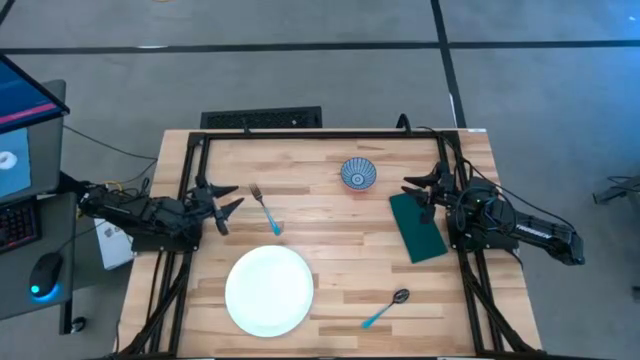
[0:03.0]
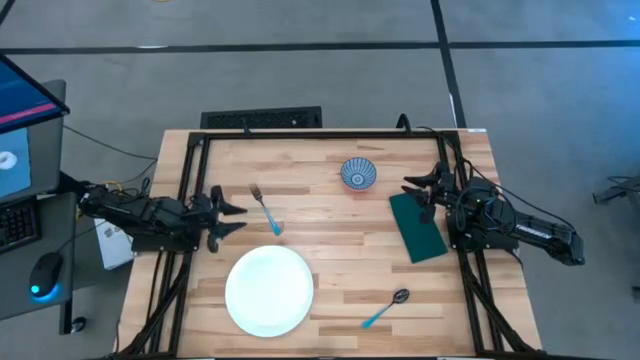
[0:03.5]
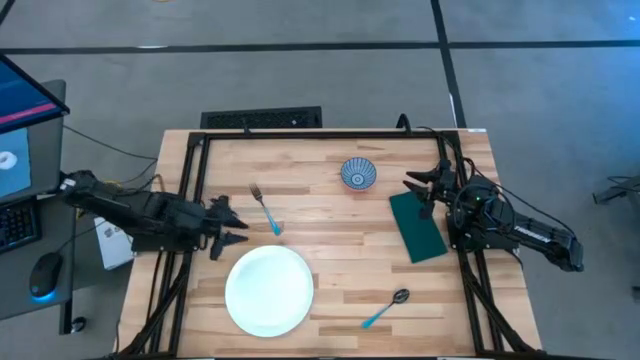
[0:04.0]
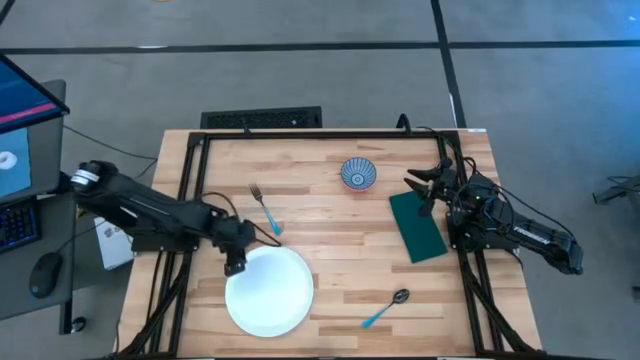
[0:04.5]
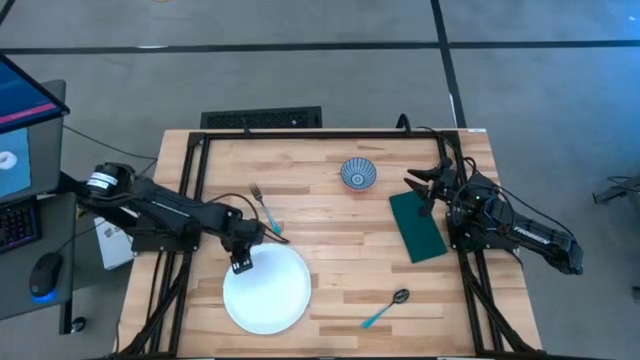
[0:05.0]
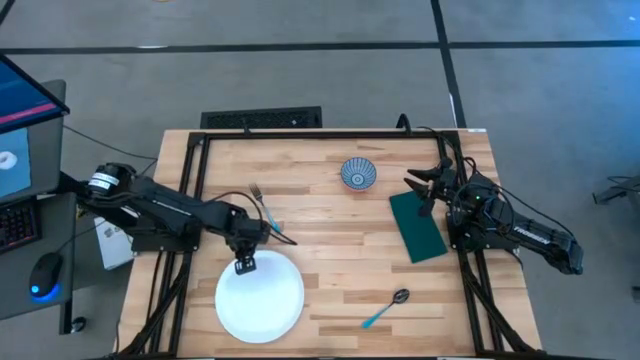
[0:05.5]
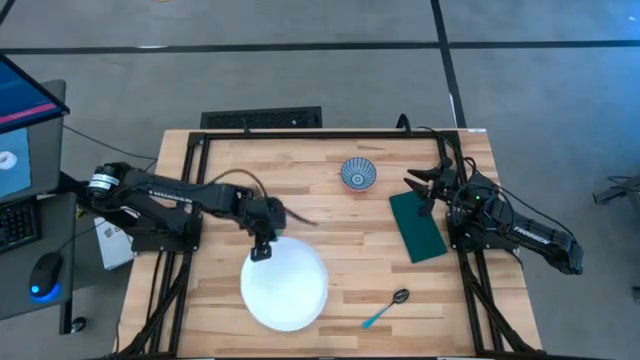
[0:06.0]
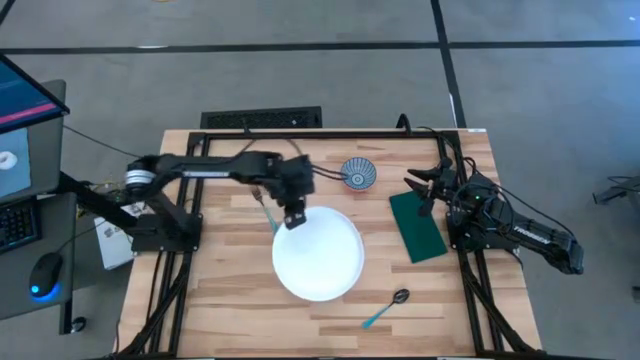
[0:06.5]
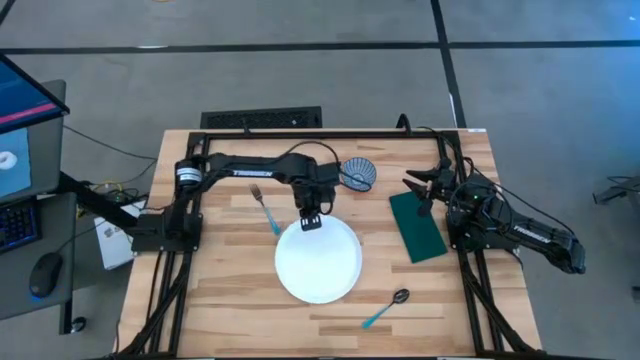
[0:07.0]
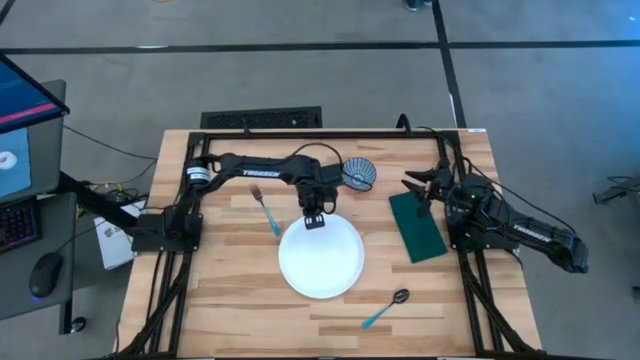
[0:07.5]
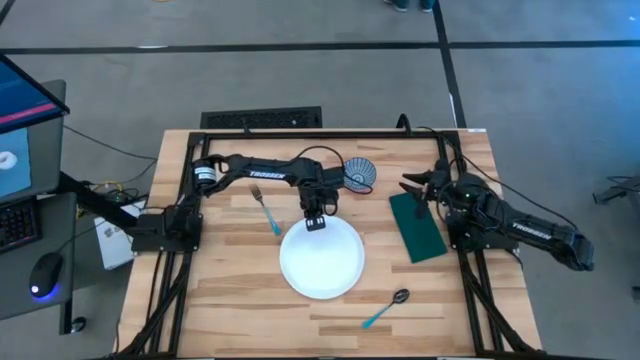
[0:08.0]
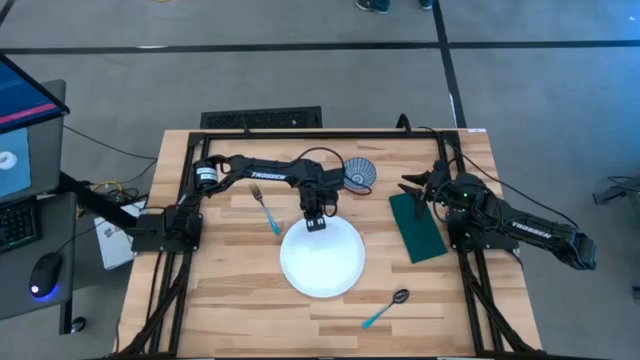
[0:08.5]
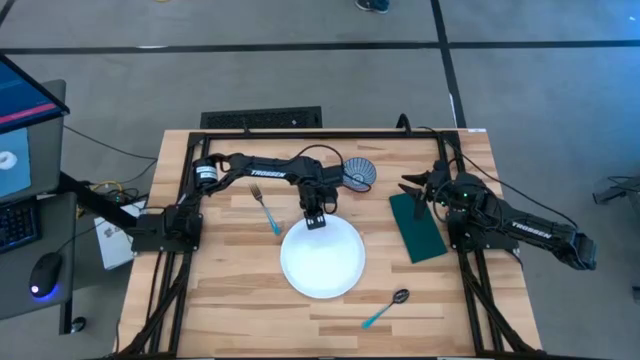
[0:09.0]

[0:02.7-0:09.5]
Task: Set table place
Move the white plate to the center of the table

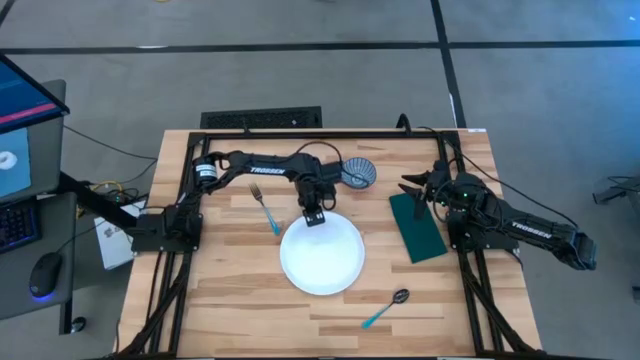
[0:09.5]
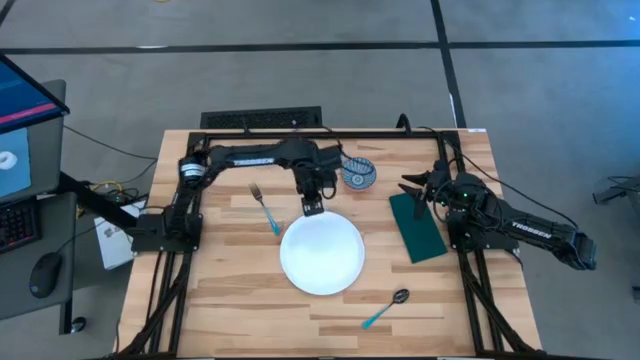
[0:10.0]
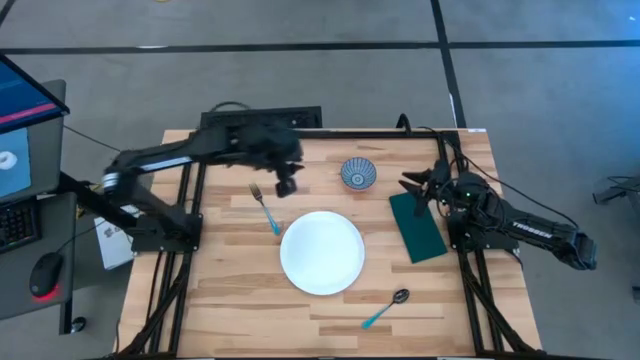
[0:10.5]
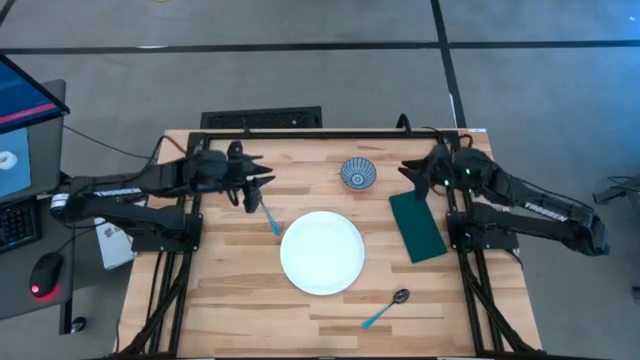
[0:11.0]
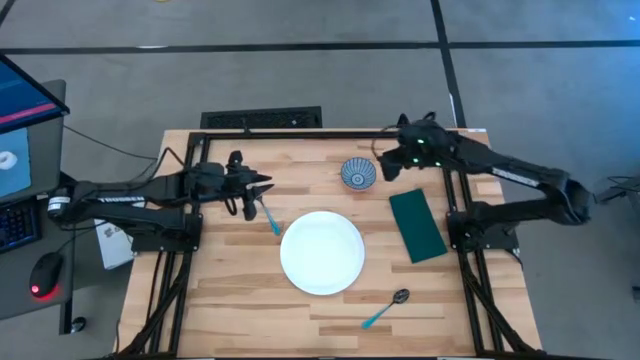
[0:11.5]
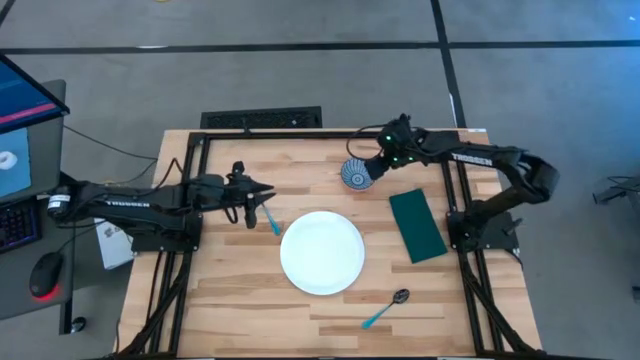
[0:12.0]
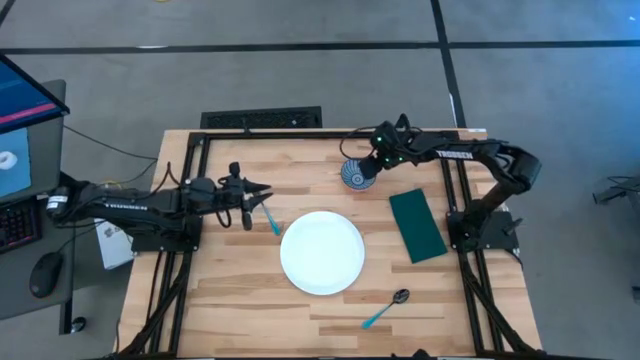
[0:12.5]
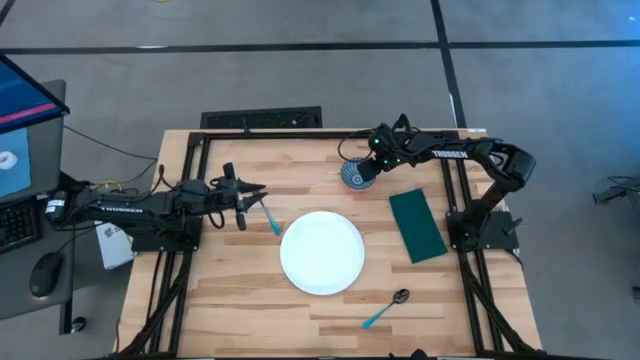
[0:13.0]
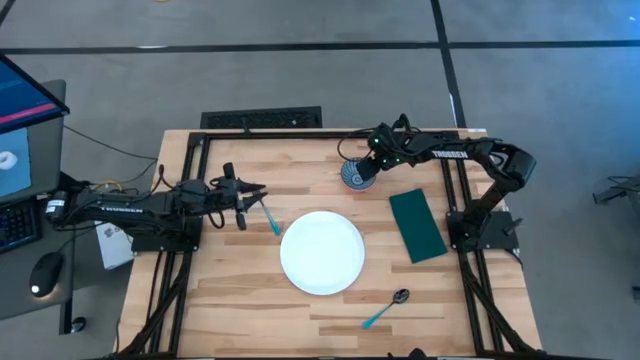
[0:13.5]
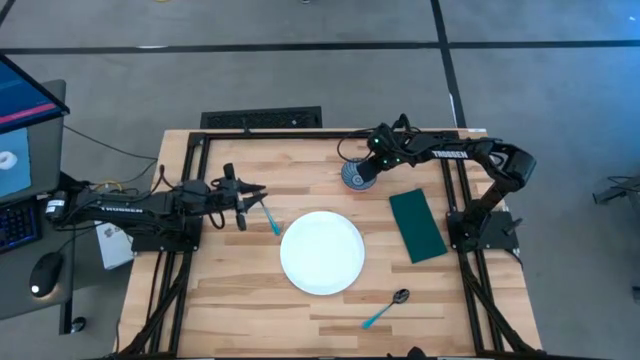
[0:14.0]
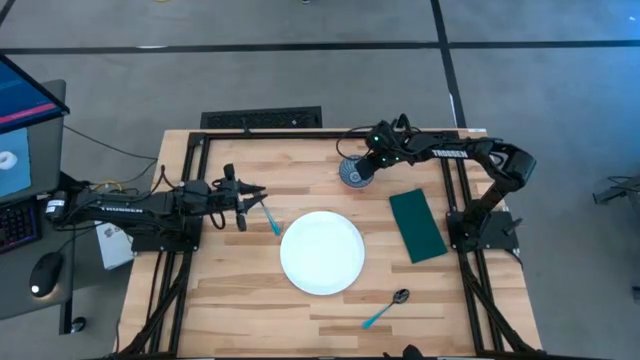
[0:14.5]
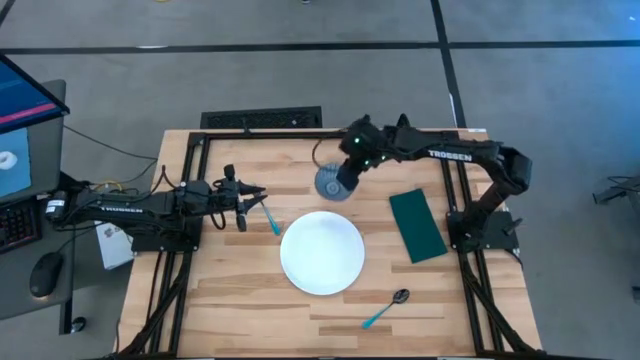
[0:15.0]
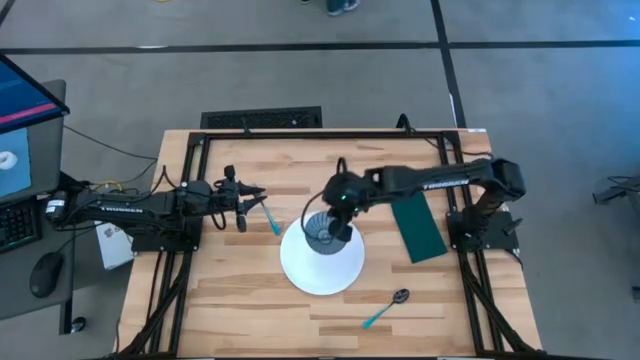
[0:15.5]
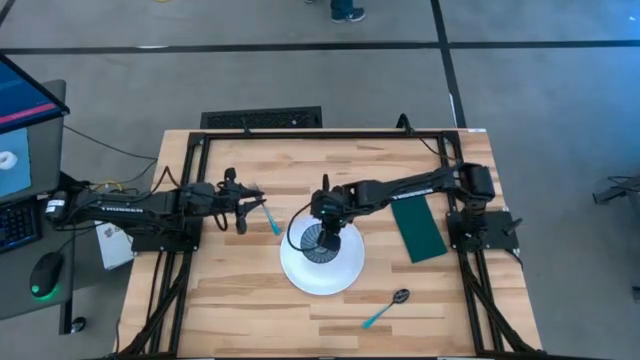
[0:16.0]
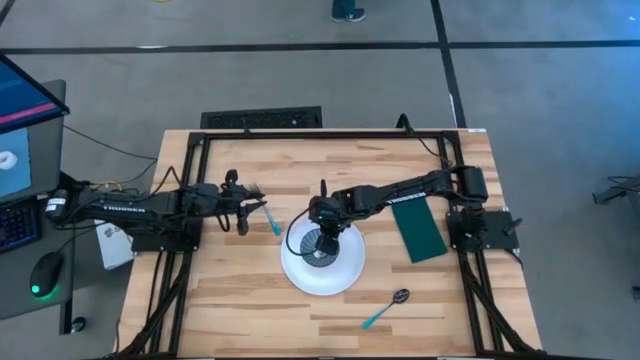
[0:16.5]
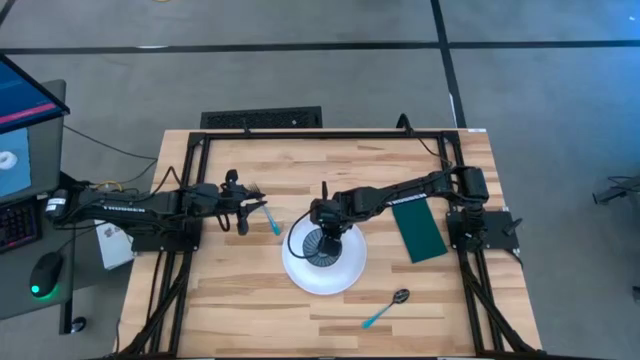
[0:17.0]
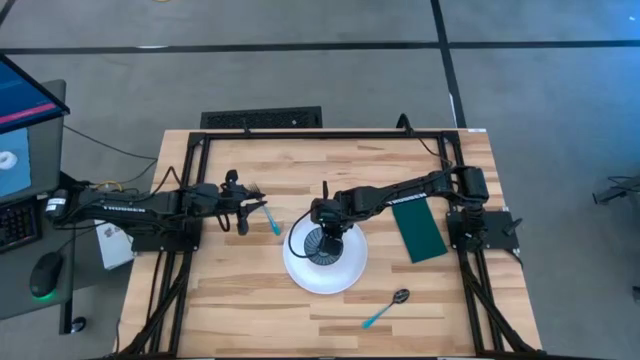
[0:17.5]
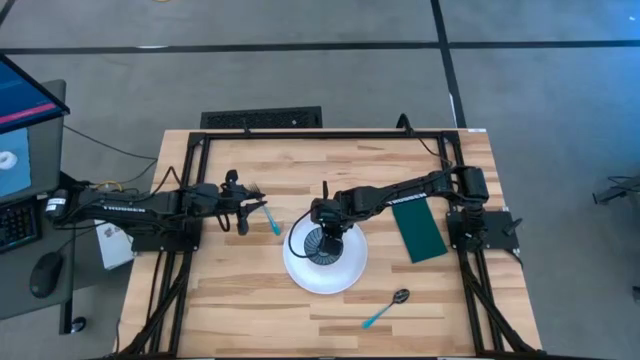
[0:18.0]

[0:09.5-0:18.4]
Put the blue bowl on the white plate

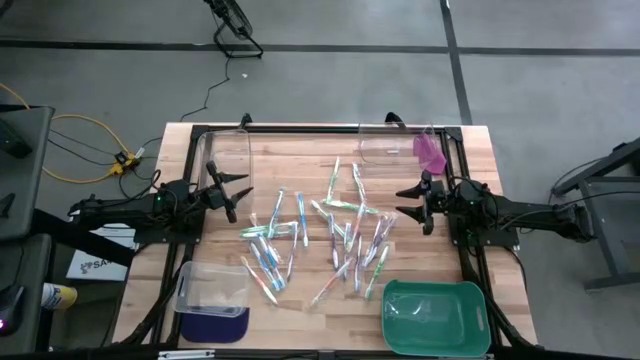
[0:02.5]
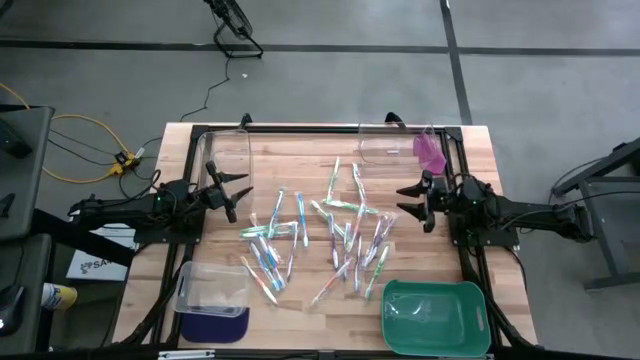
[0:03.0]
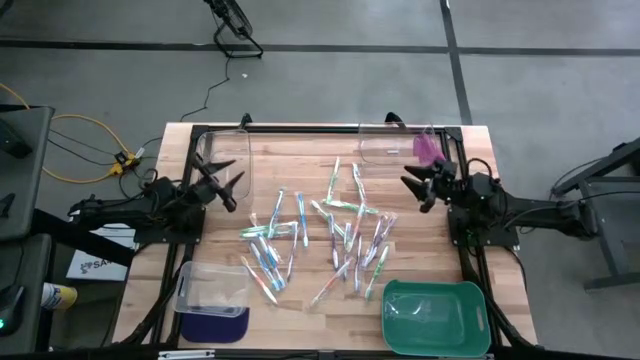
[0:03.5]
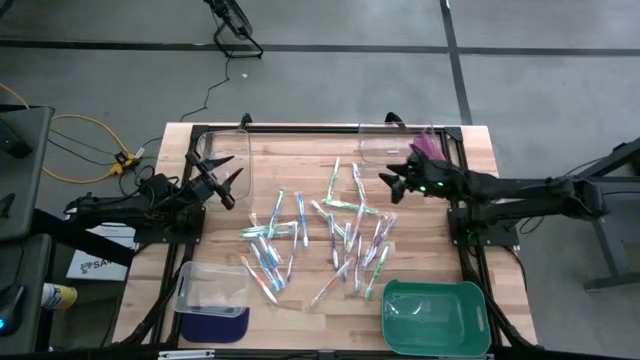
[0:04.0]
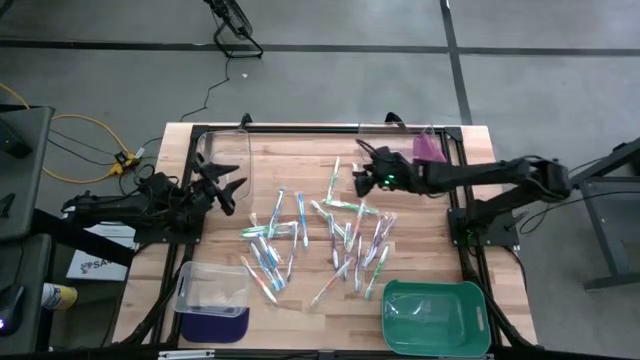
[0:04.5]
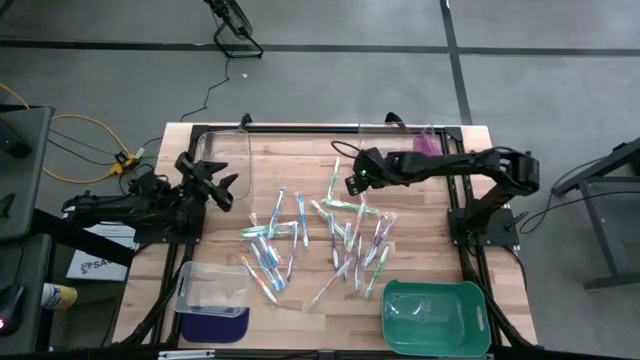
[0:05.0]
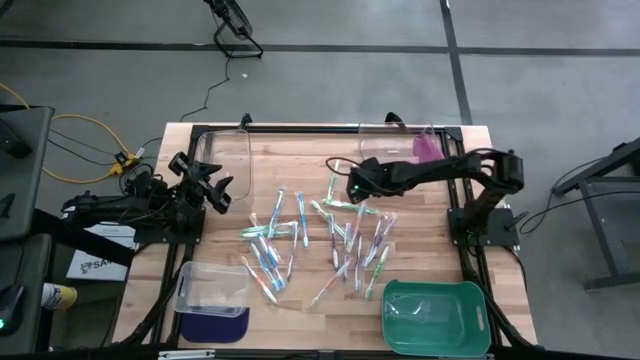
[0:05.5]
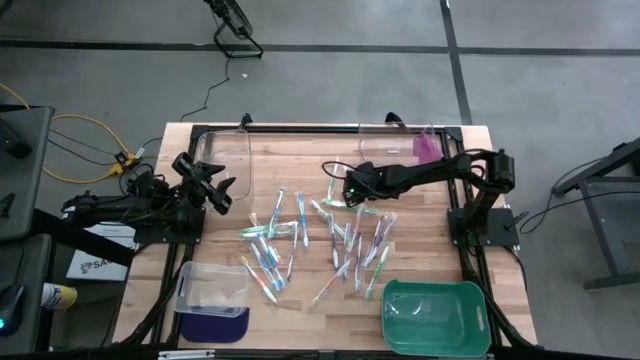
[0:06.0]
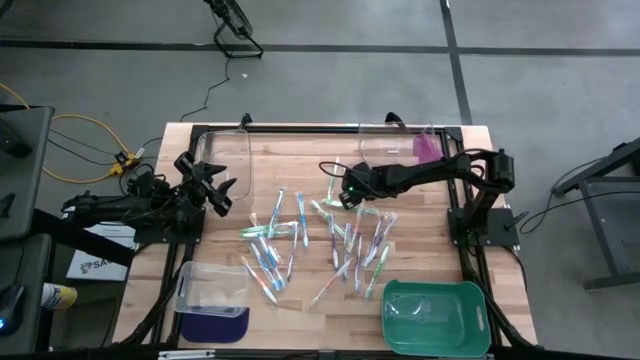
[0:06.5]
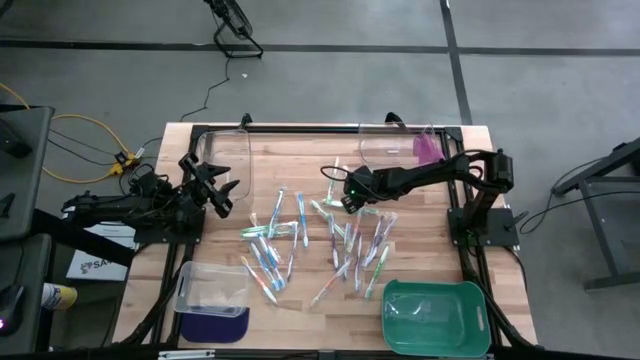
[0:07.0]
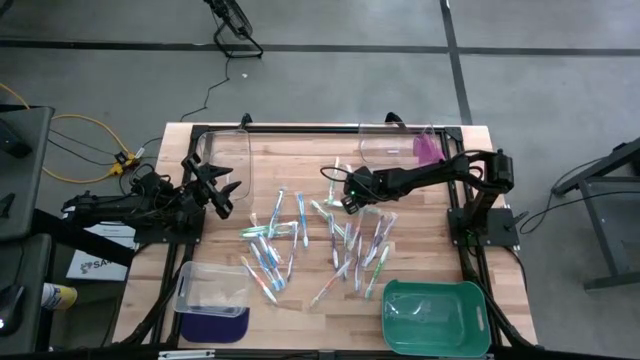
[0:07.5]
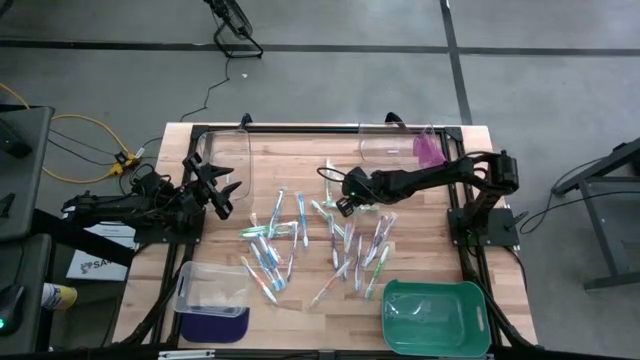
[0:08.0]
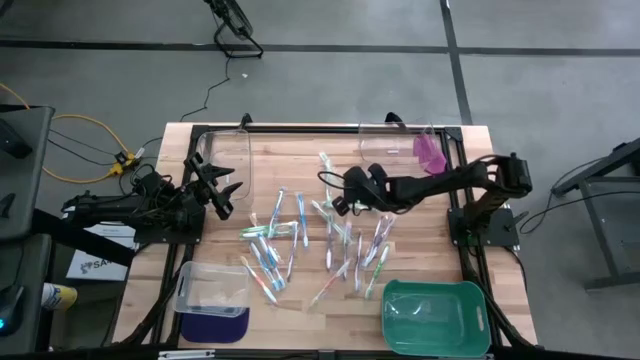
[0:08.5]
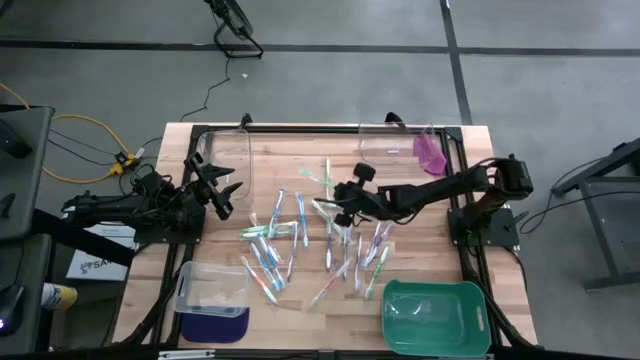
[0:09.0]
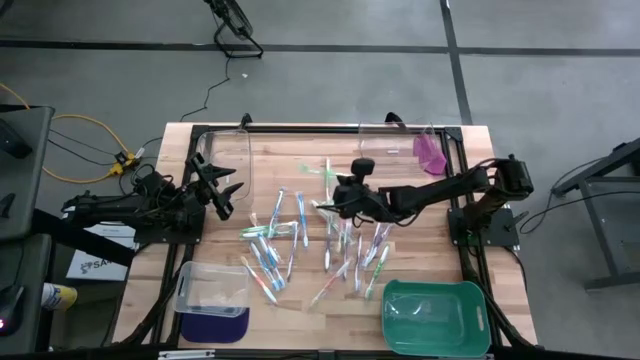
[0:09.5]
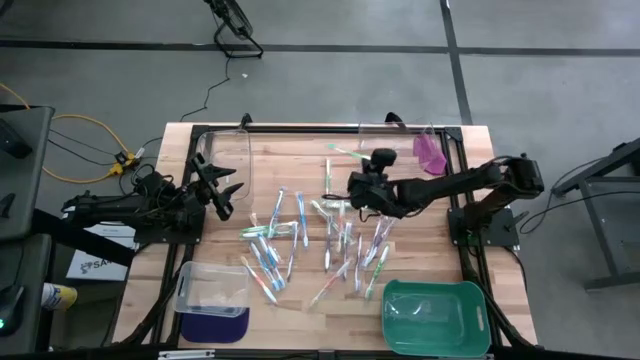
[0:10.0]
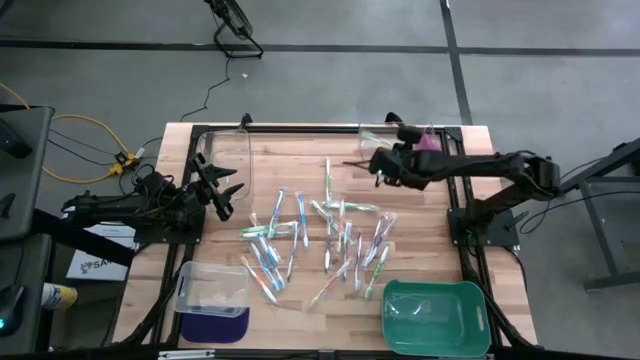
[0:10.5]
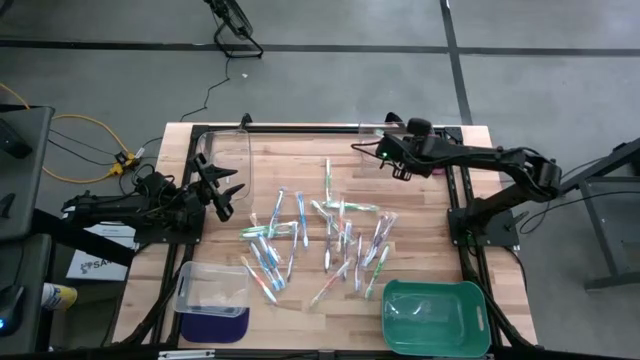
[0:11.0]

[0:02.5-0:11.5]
Task: Pick & Place Toothbrushes
Put the green toothbrush into the top right transparent bin
